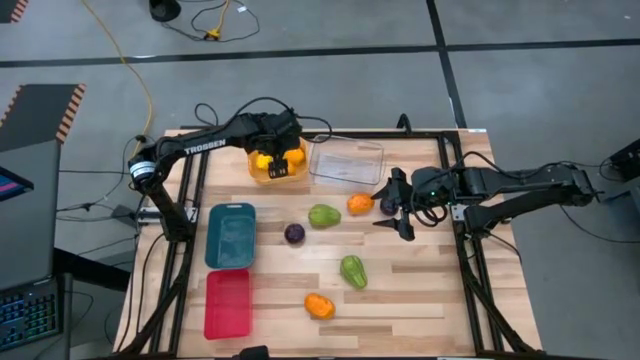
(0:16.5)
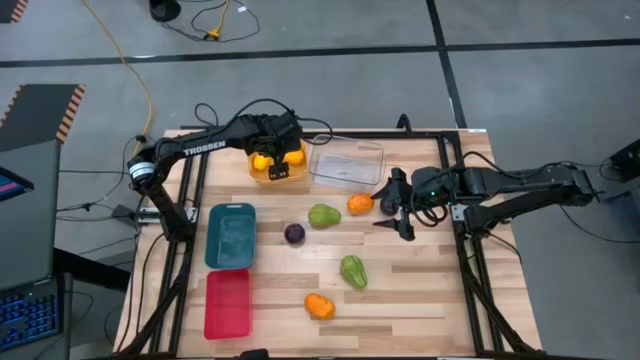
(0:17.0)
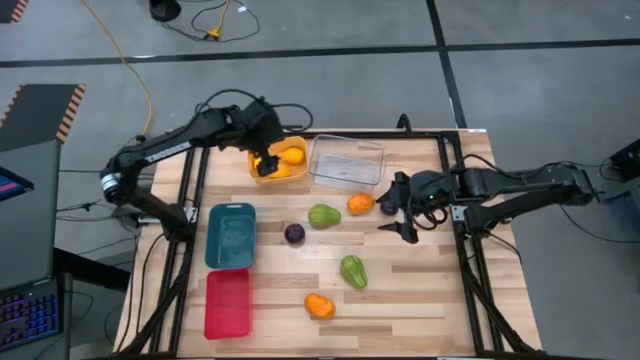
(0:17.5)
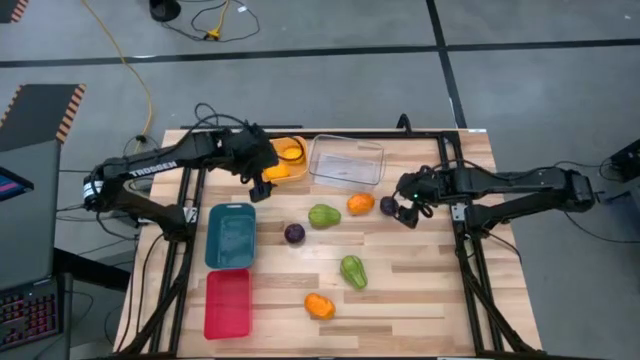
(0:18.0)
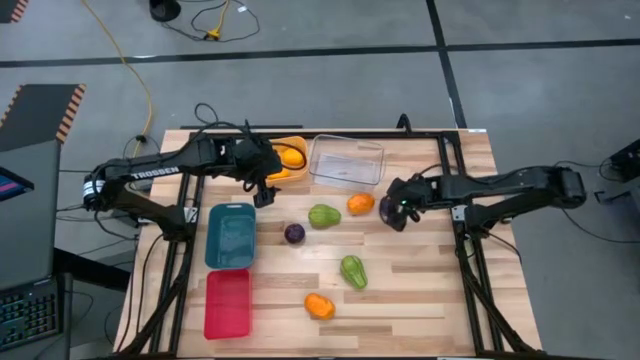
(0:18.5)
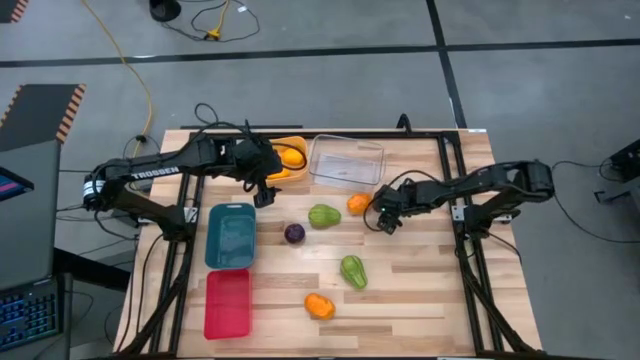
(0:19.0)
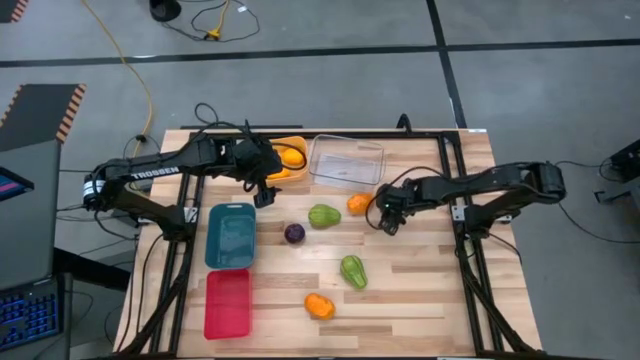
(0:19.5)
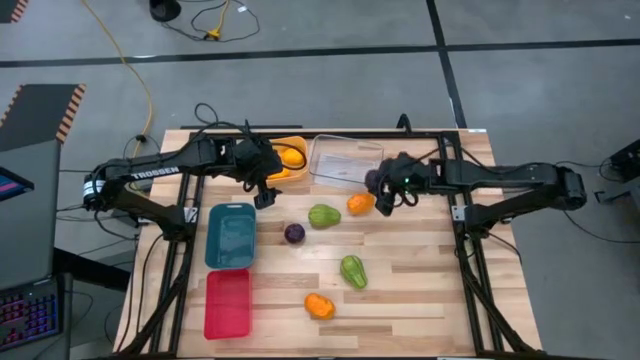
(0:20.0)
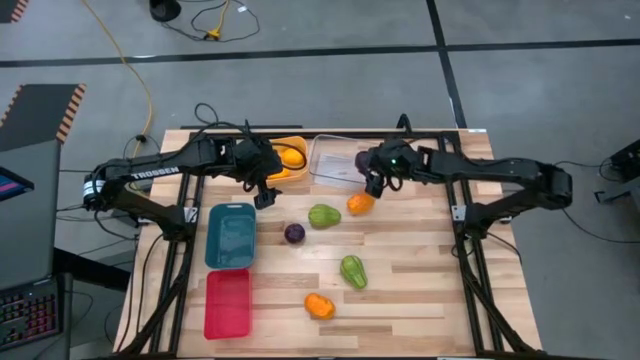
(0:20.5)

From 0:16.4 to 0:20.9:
Task: Sort produce into baskets
Put the right purple plum into the transparent bin

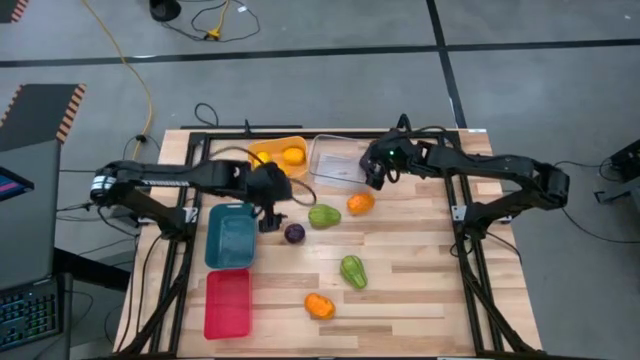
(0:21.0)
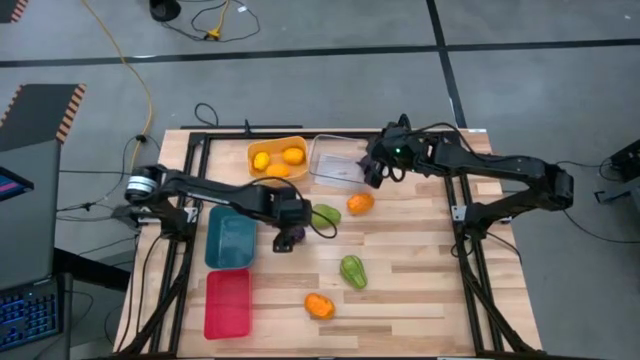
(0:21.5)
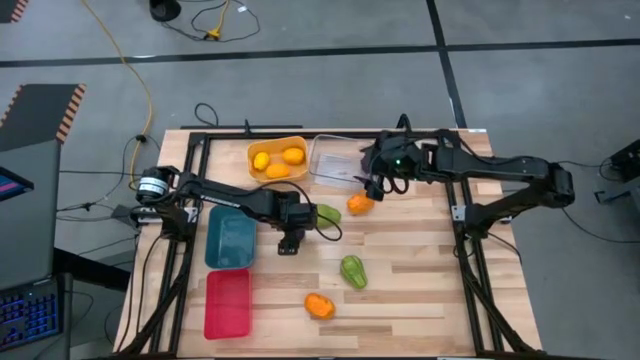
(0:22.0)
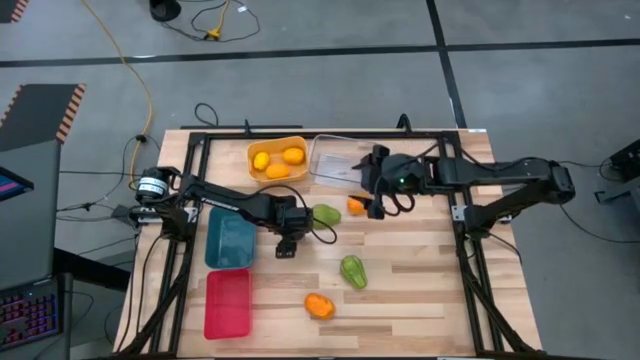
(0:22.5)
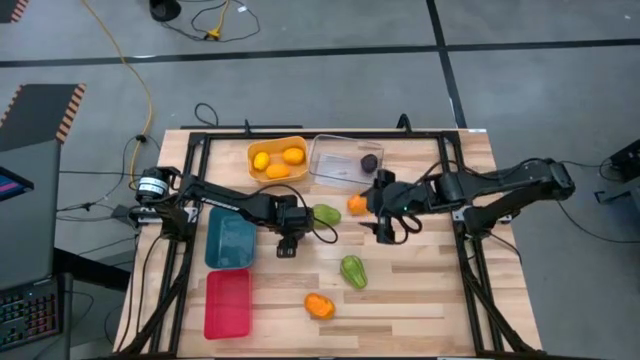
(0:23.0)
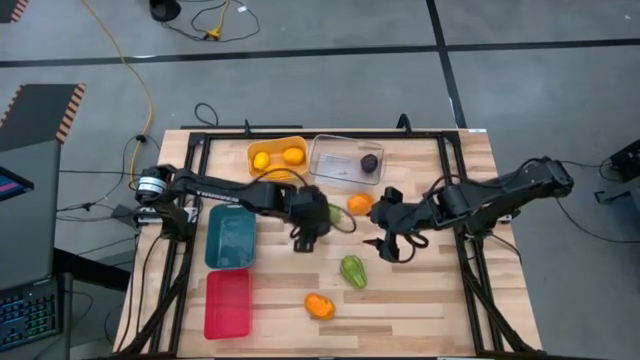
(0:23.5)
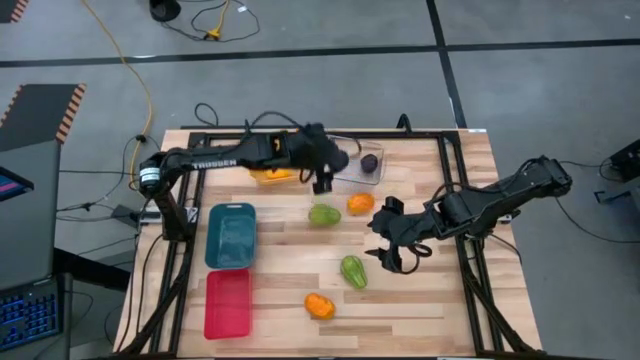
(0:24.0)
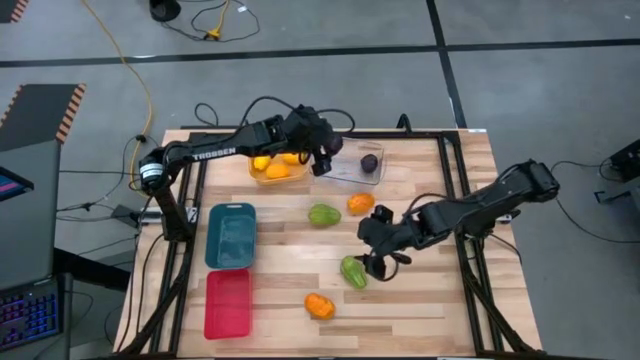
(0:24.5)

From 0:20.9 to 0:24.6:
Put the purple plum into the transparent bin

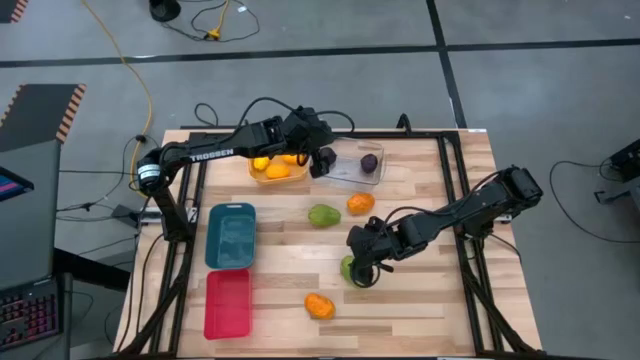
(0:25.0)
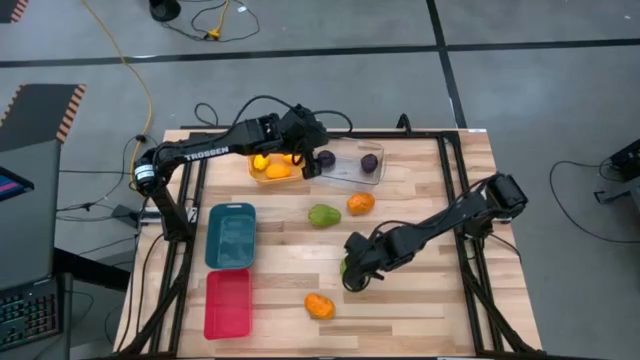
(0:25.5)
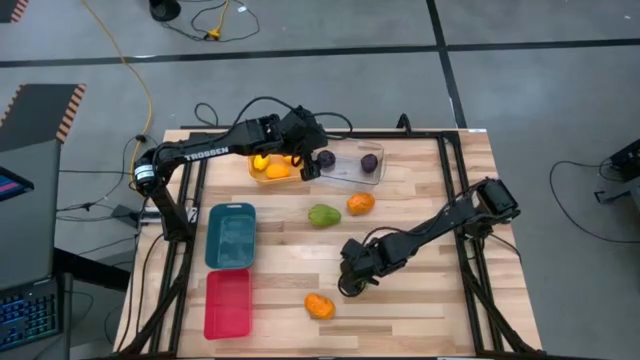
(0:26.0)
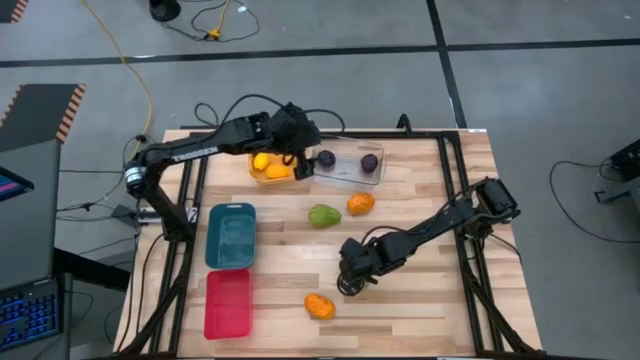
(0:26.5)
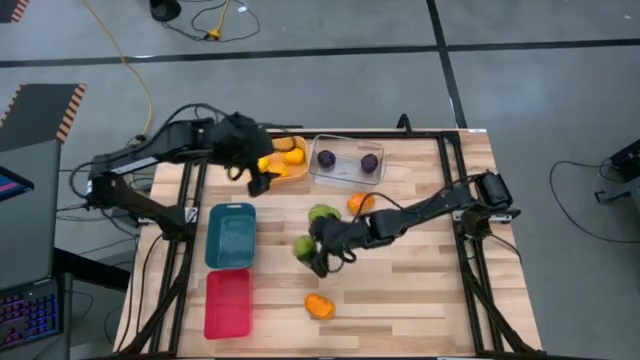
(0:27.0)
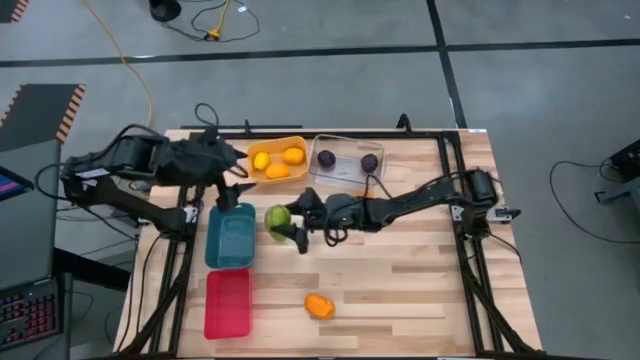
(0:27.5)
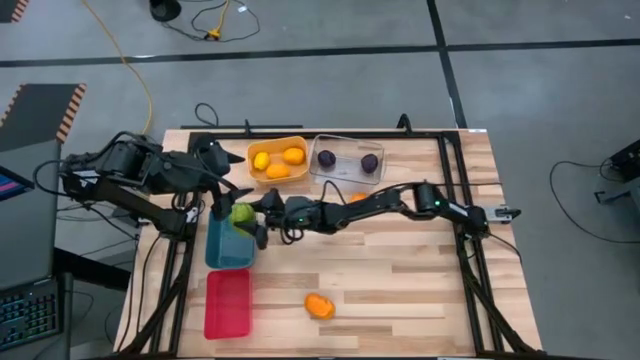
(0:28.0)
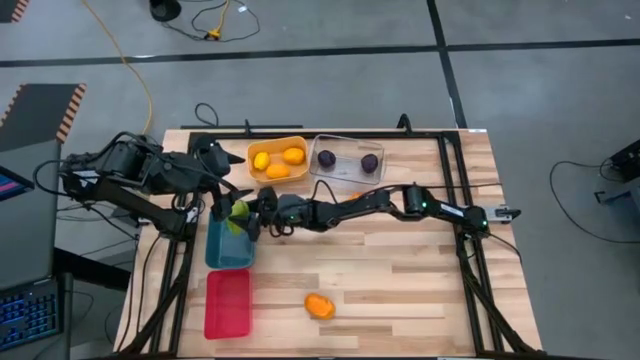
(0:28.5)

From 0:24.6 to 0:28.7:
Put the bottom green chayote into the blue bin

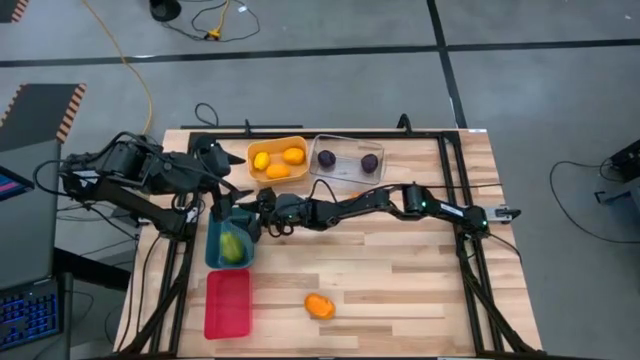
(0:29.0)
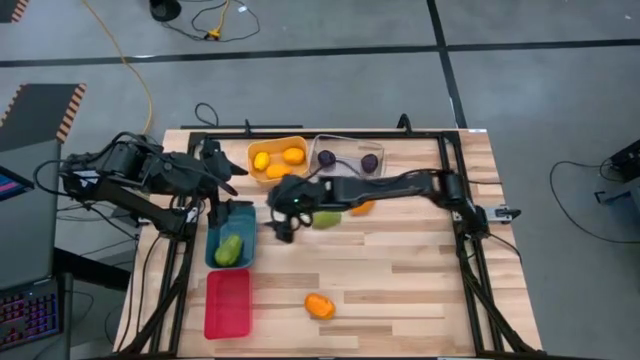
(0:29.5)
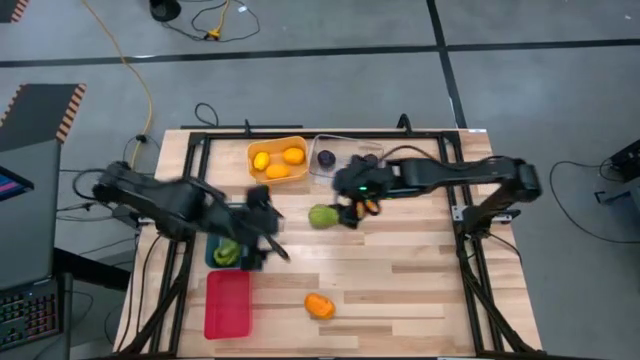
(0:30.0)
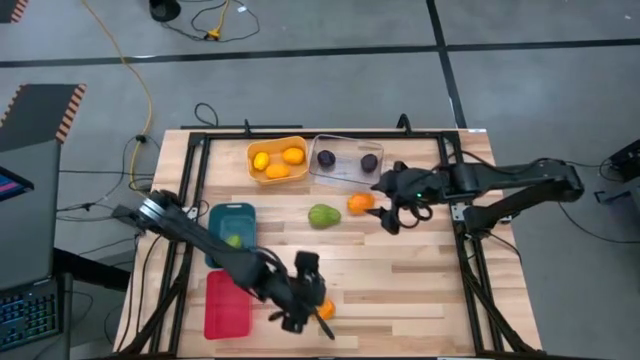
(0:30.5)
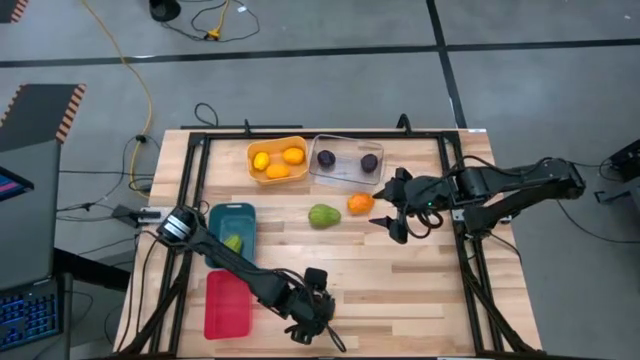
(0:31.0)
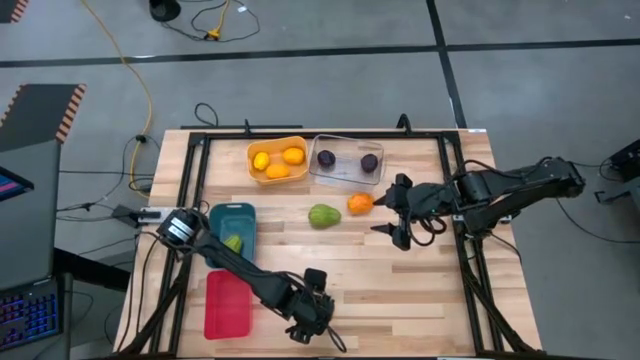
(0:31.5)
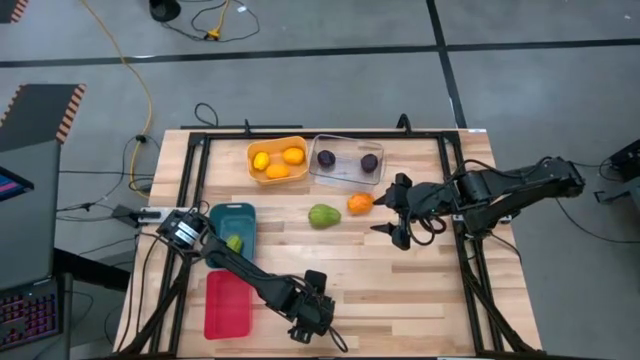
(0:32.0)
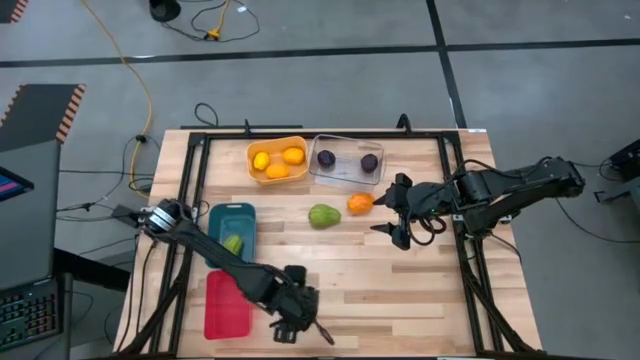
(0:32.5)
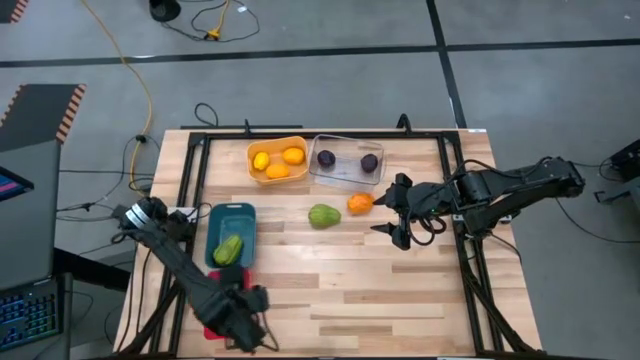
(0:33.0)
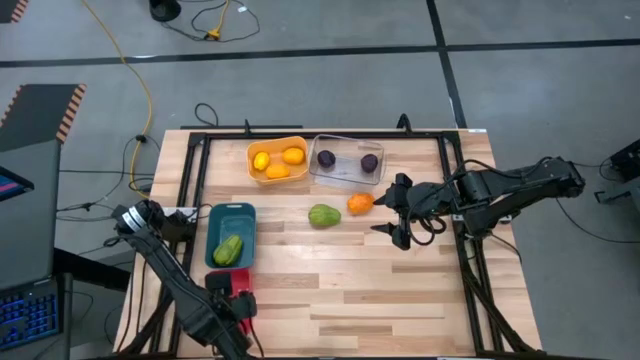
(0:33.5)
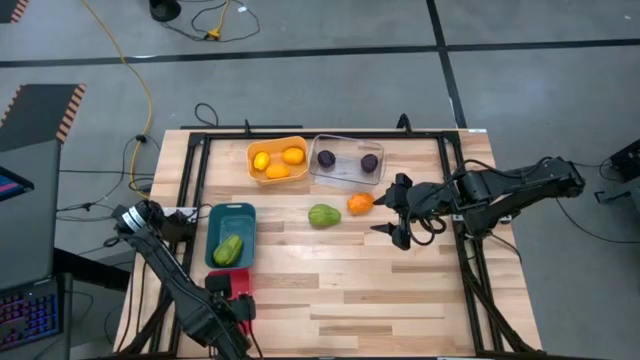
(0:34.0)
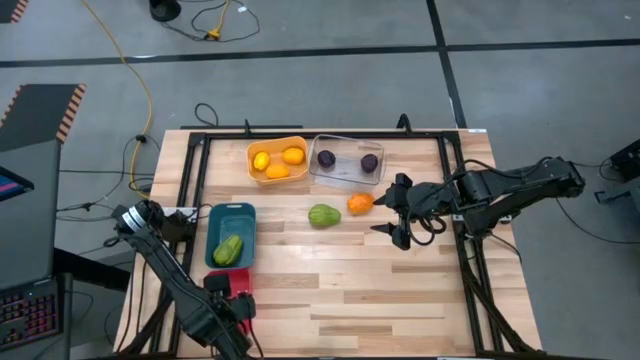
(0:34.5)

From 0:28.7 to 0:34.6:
Put the bottom orange potato into the red bin

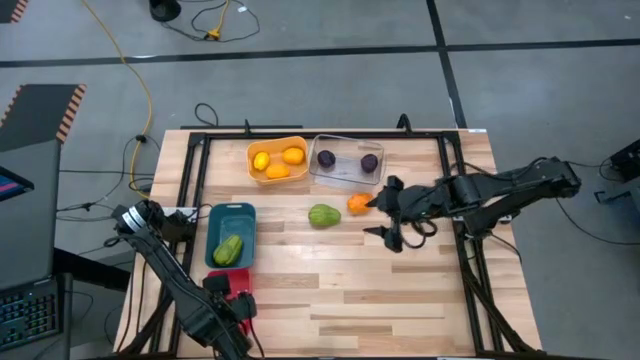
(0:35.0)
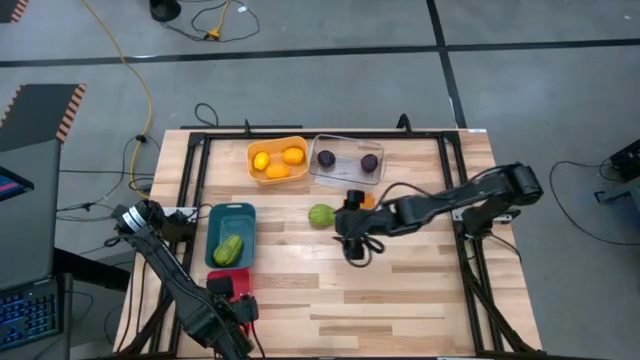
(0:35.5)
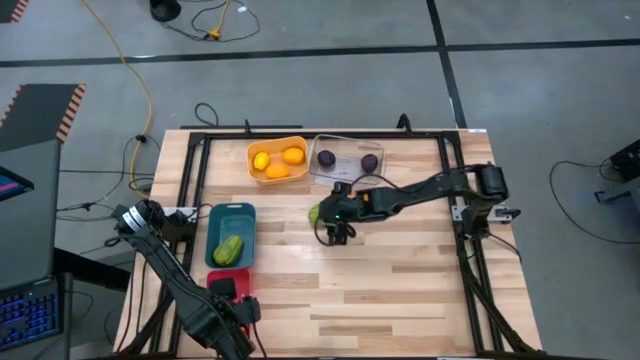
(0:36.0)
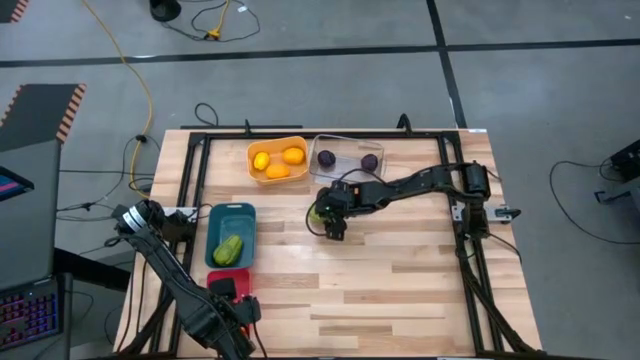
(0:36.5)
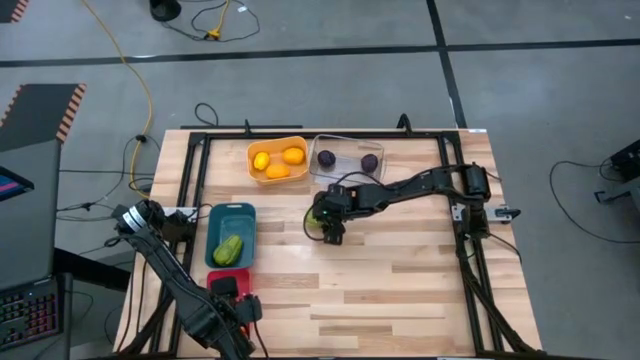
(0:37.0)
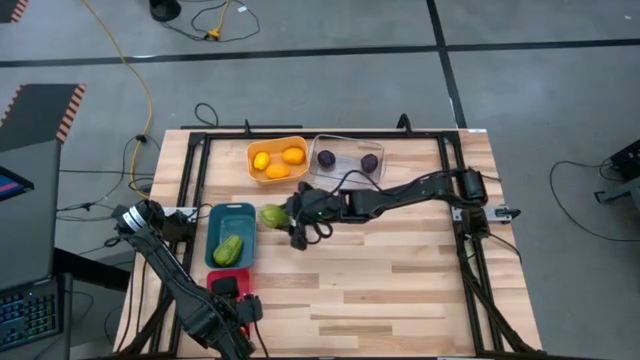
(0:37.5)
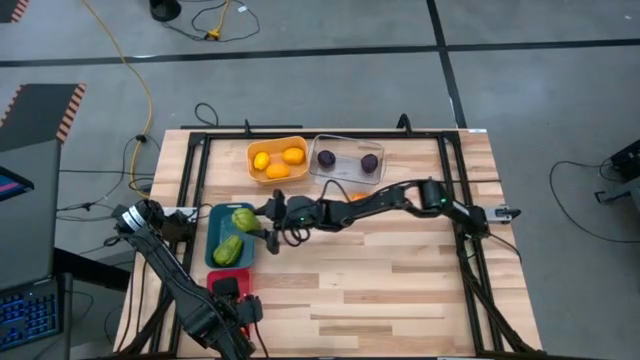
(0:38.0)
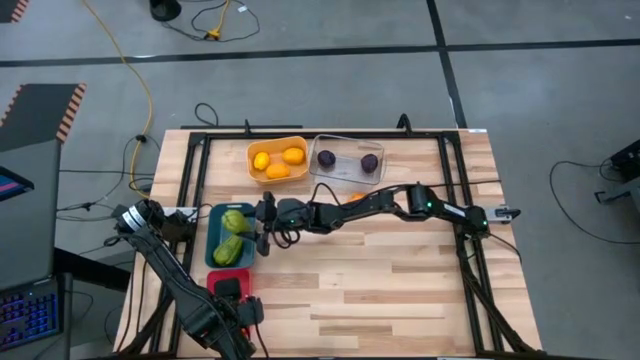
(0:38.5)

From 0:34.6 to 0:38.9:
Put the green chayote into the blue bin
